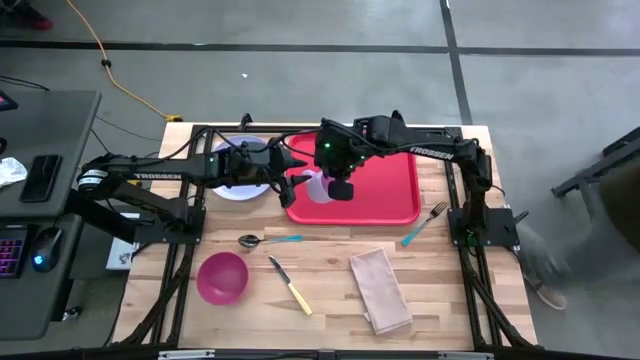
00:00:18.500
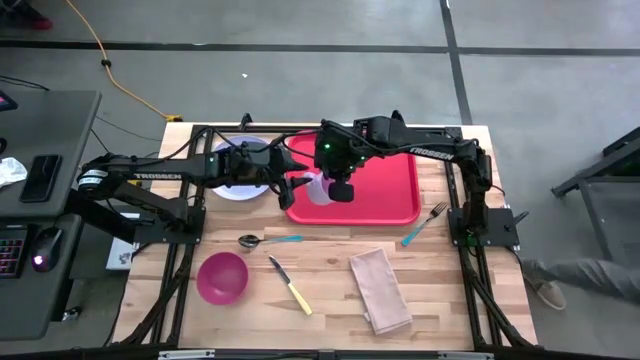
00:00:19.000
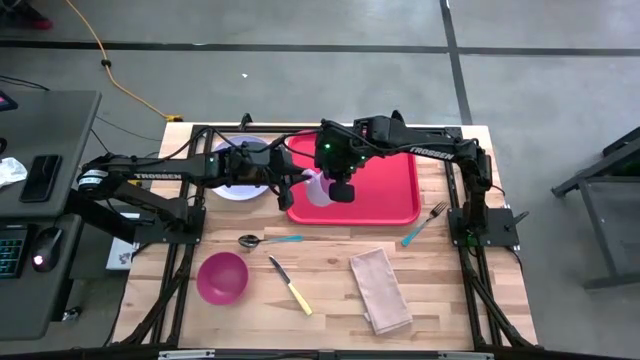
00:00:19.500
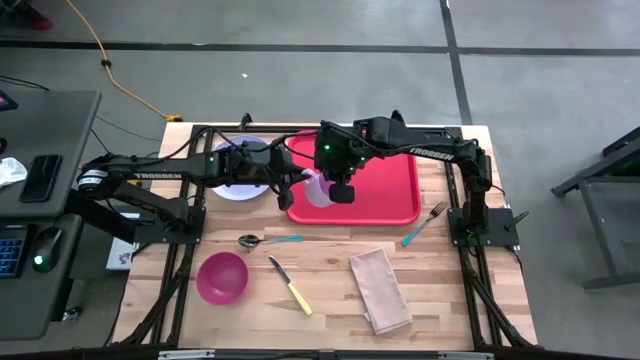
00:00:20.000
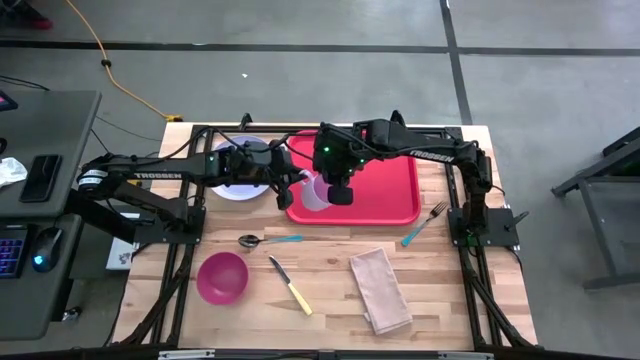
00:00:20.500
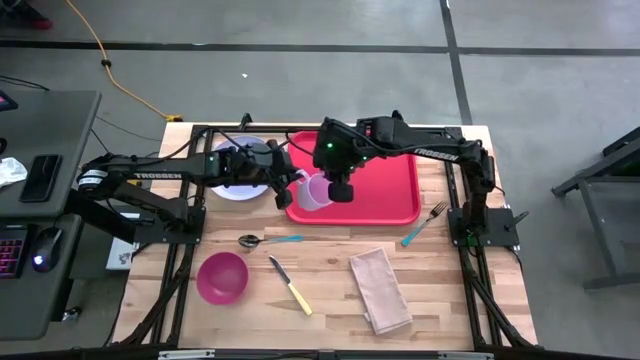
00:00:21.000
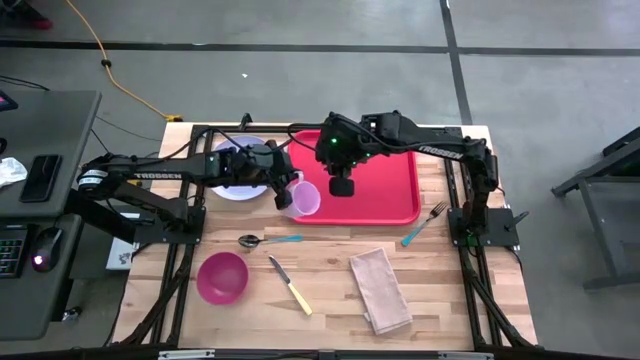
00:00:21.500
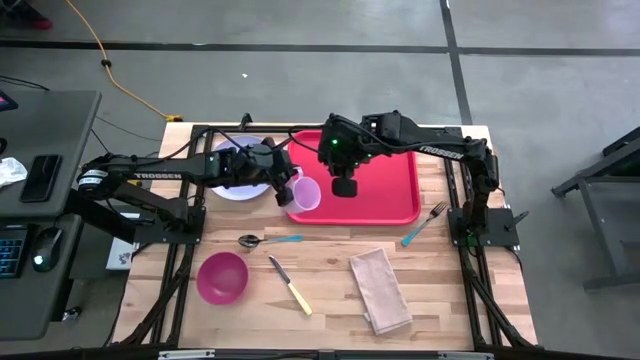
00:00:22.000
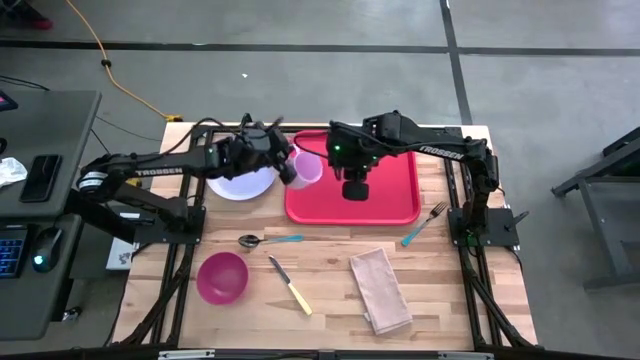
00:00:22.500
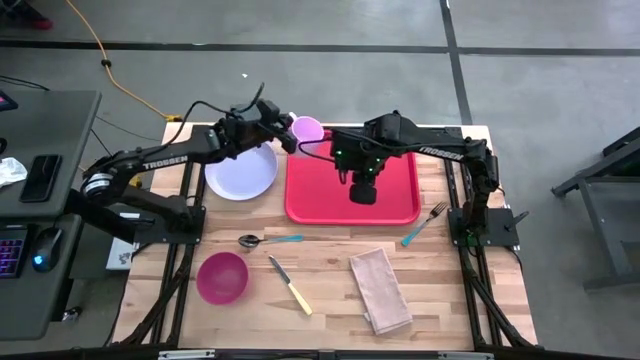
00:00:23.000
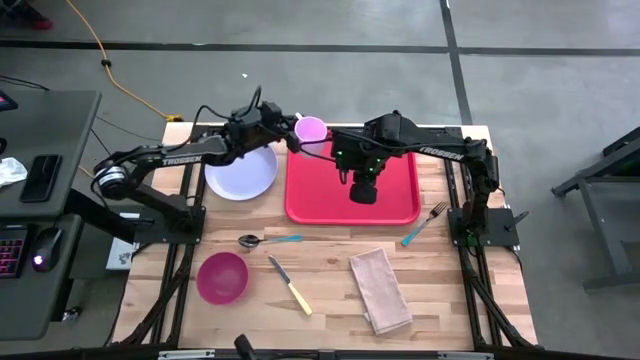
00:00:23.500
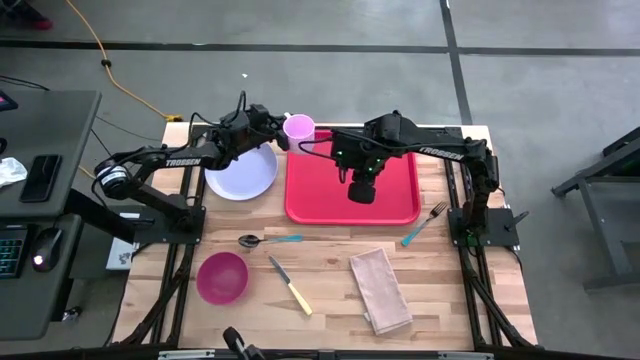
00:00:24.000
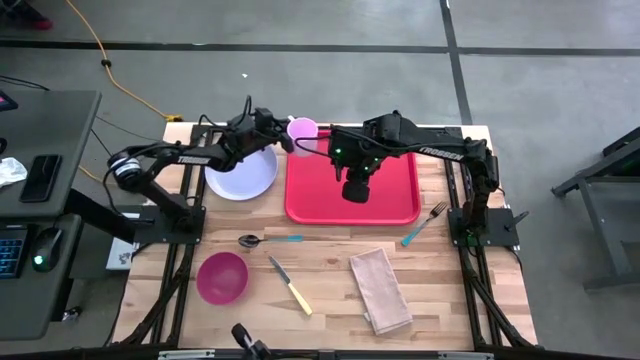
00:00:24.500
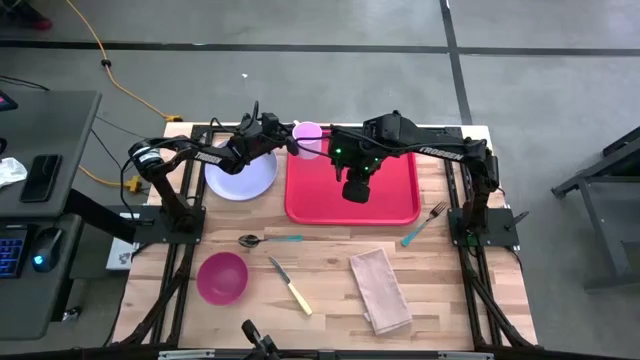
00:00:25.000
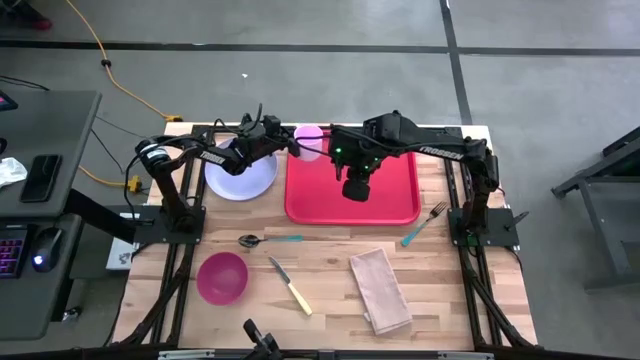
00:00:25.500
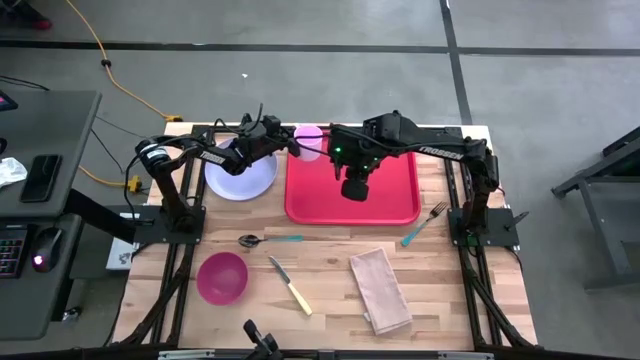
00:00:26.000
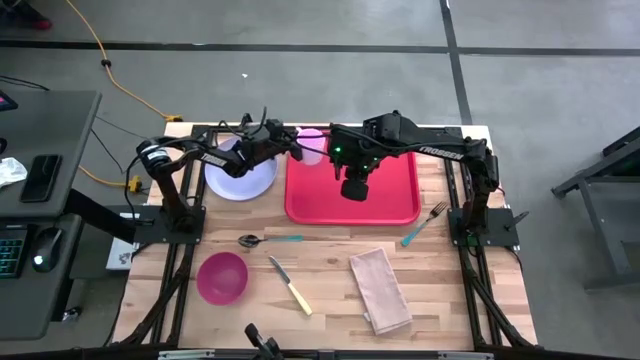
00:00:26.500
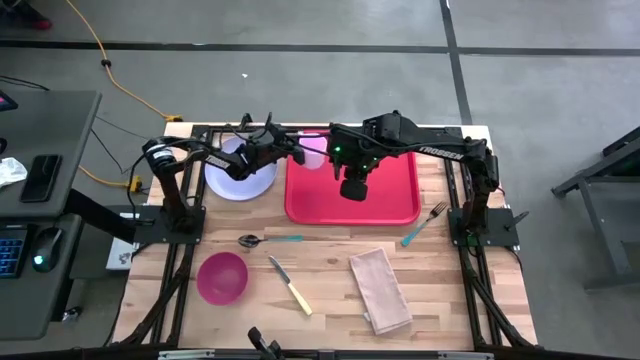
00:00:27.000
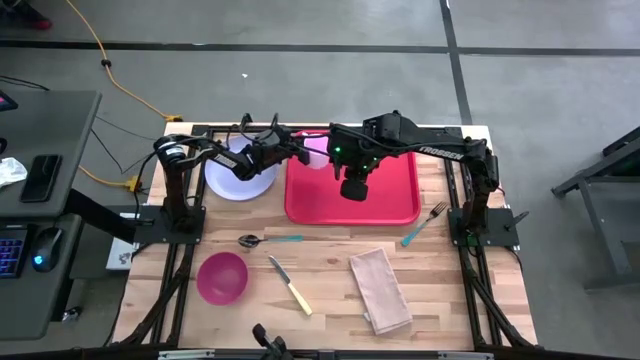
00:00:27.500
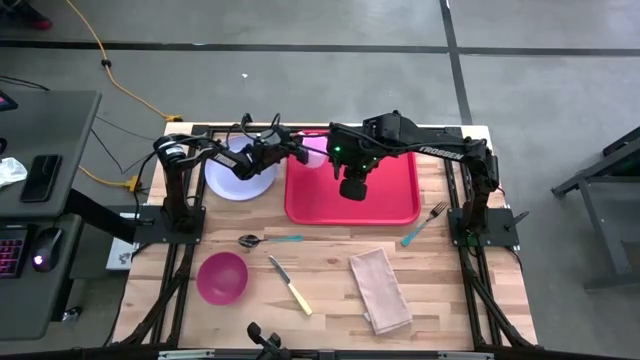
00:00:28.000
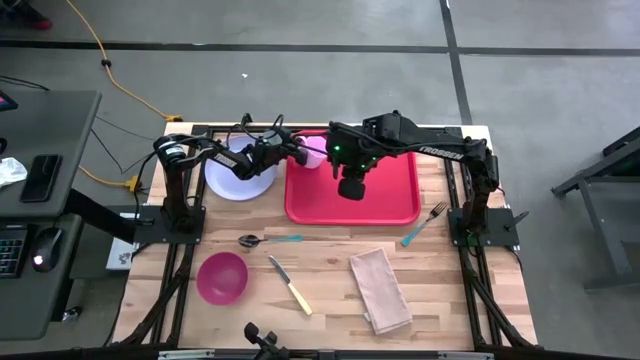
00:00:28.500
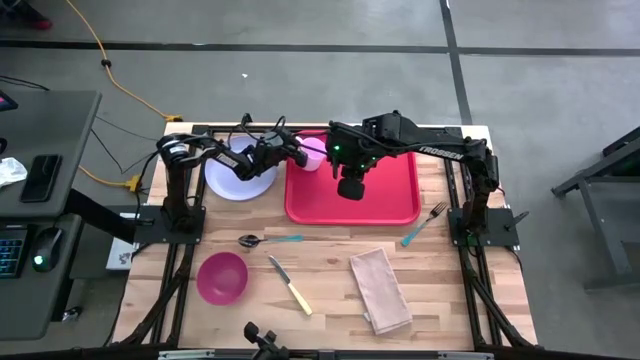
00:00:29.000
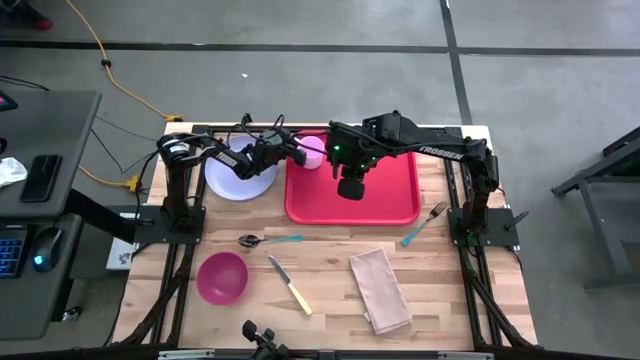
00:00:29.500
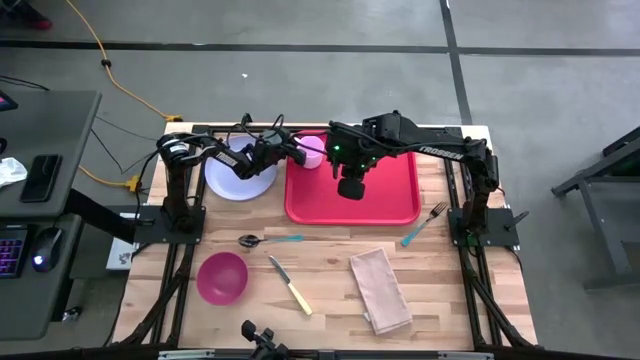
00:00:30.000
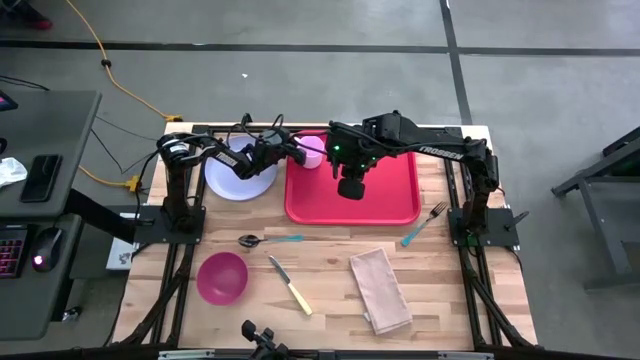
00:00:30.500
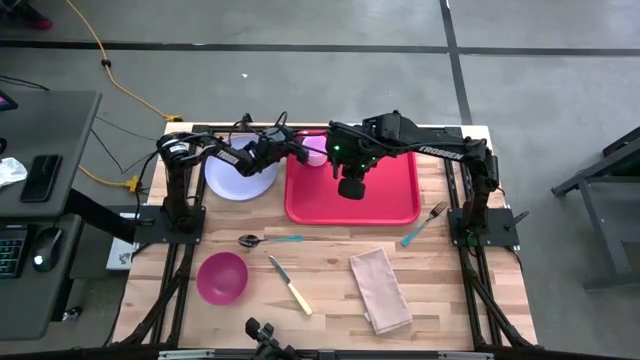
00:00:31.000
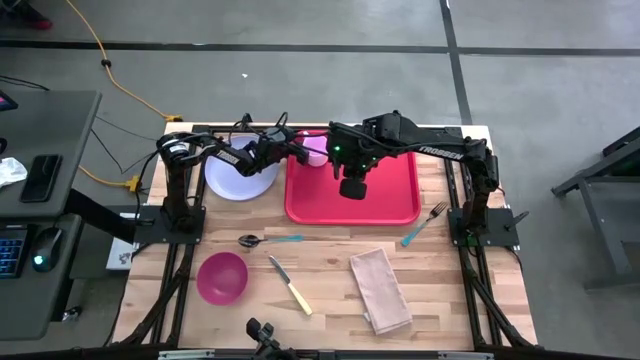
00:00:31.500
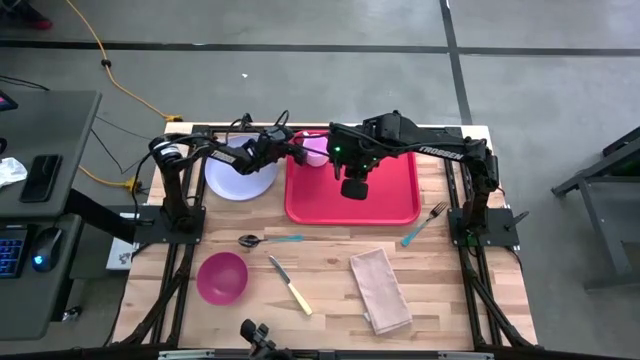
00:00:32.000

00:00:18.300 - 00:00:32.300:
Task: Set up tray
Put the pink mug on the red tray

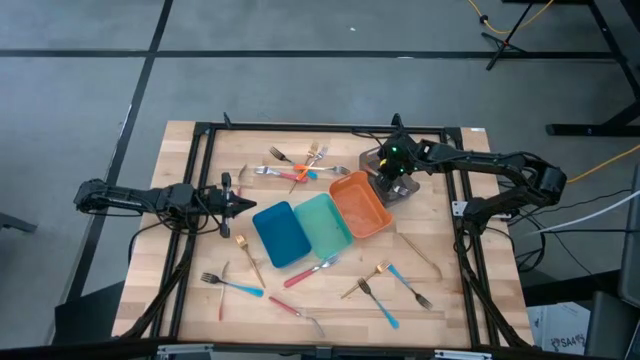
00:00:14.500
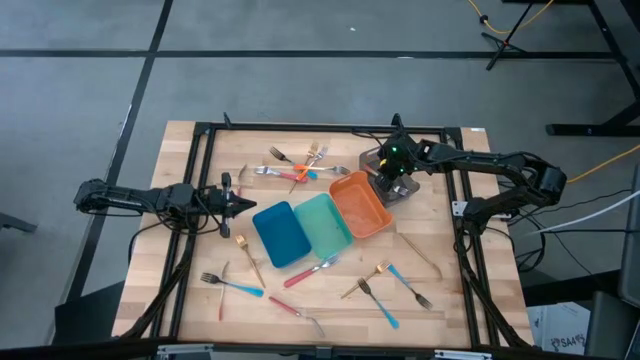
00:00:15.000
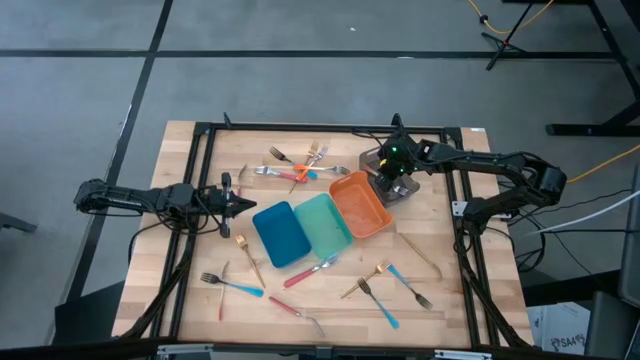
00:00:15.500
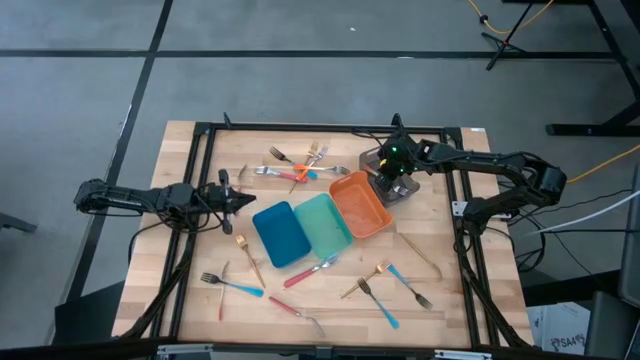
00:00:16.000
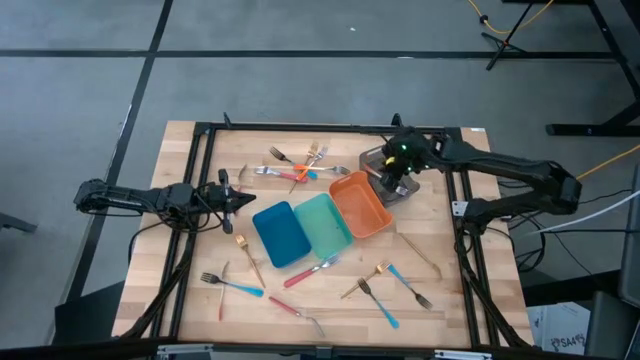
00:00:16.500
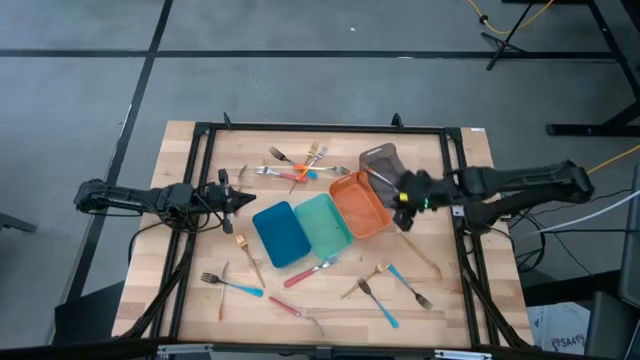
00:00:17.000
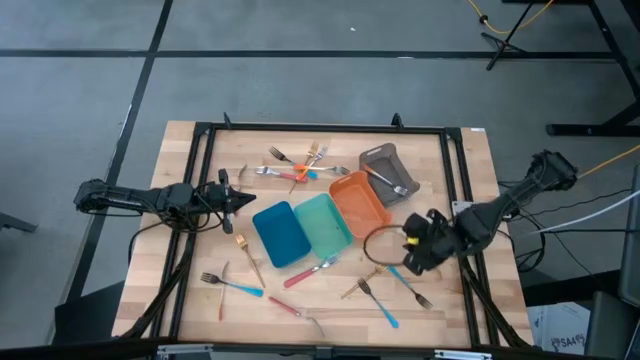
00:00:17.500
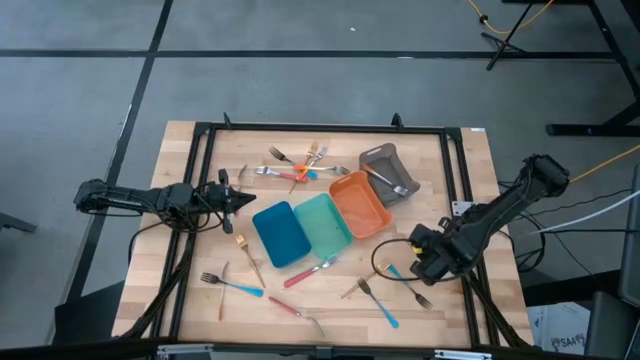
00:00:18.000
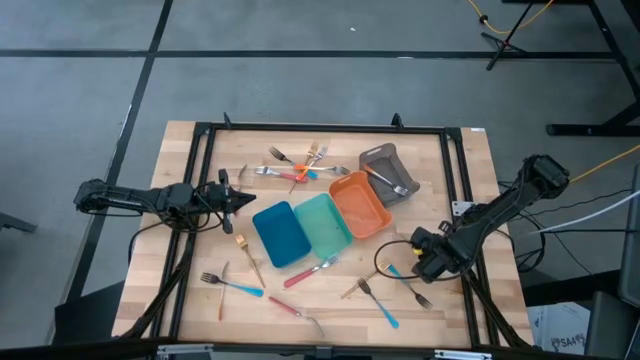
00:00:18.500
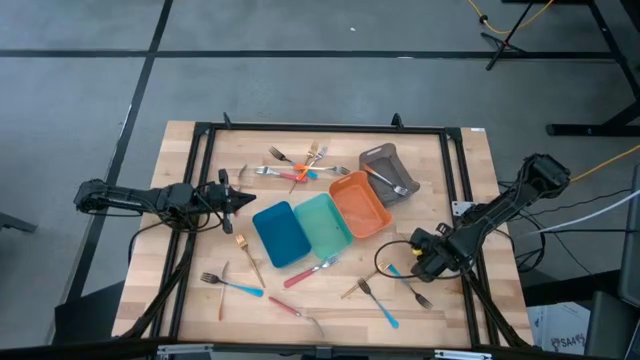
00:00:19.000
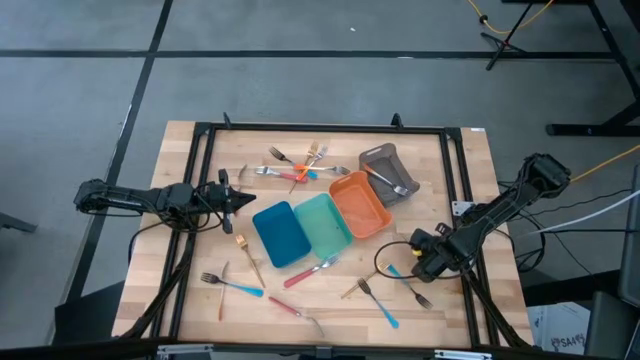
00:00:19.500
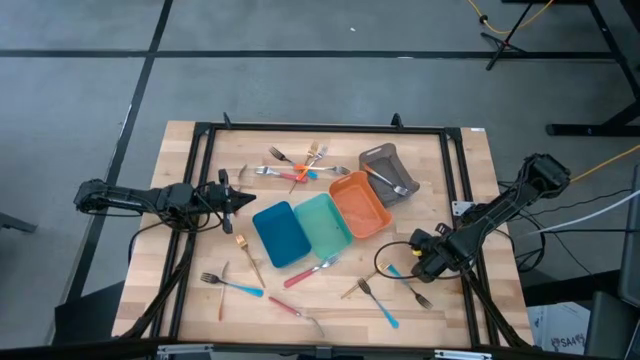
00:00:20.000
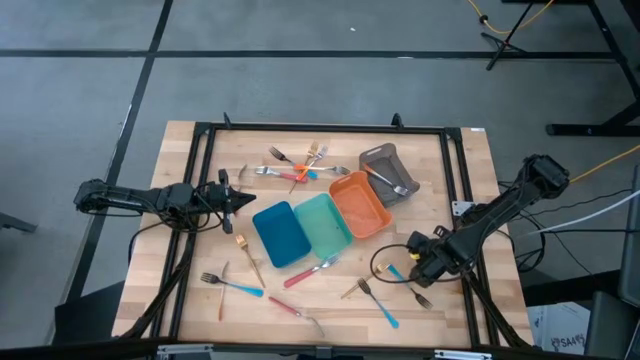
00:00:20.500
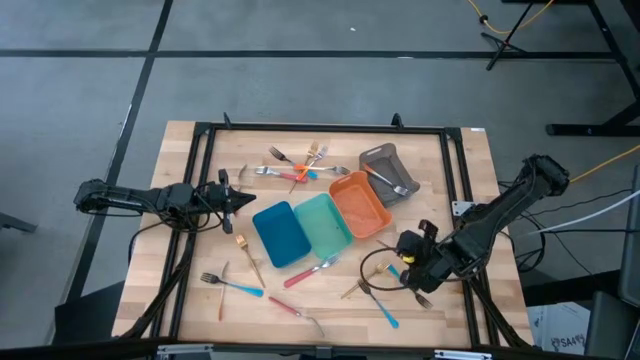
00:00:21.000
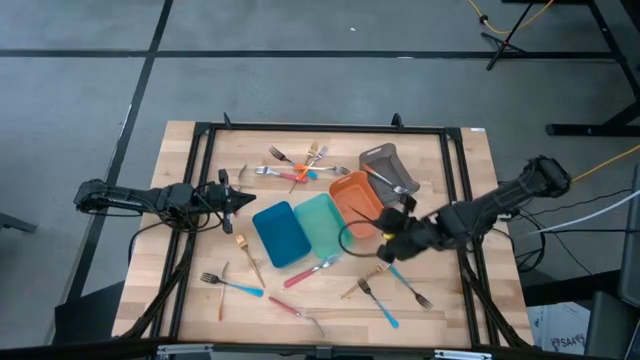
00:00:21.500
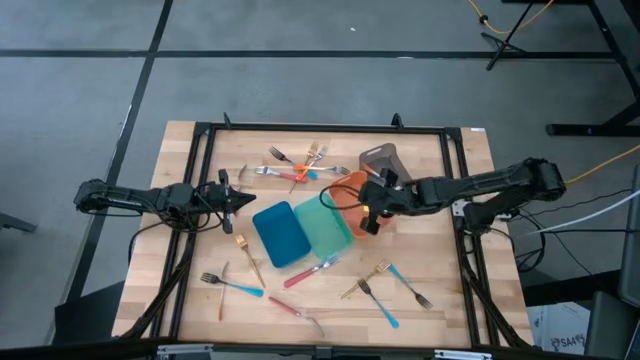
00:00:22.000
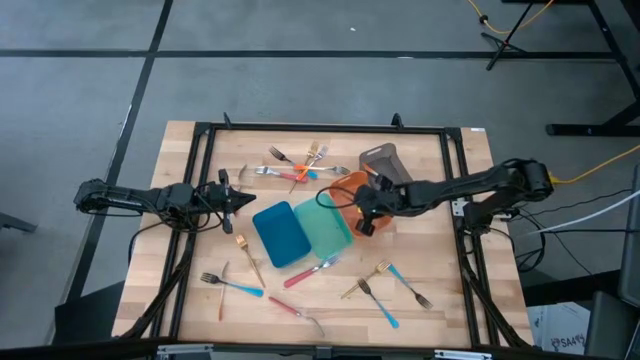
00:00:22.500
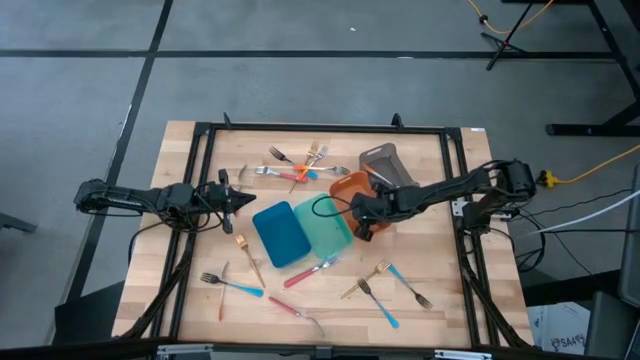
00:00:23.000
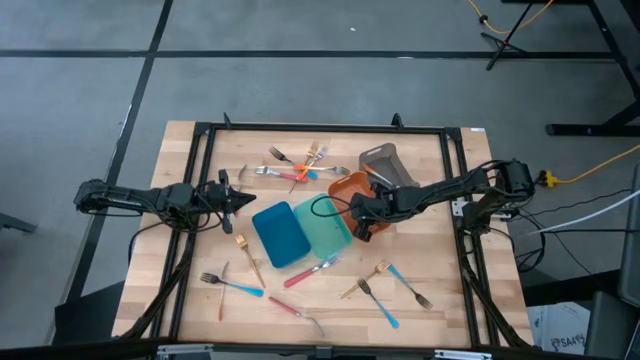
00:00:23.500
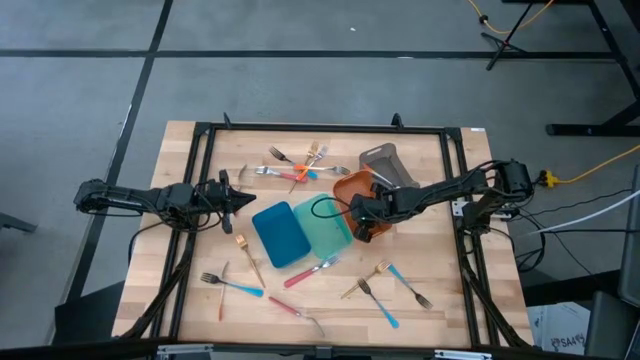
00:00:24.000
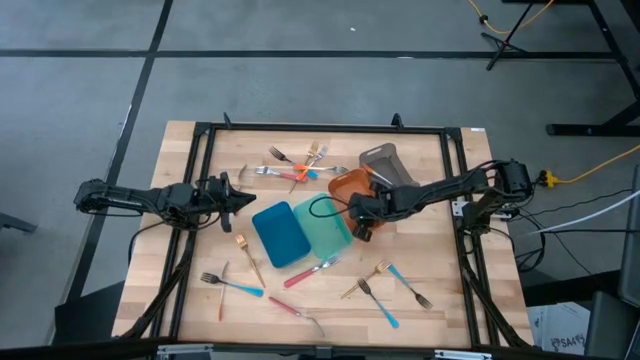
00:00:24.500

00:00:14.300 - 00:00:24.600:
Task: Sort silverware by color (type)
Put the gold fork into the orange bin
